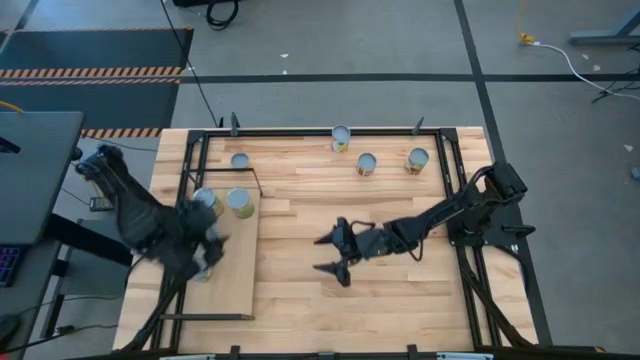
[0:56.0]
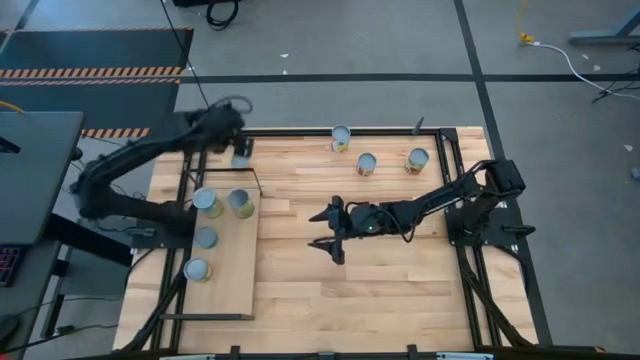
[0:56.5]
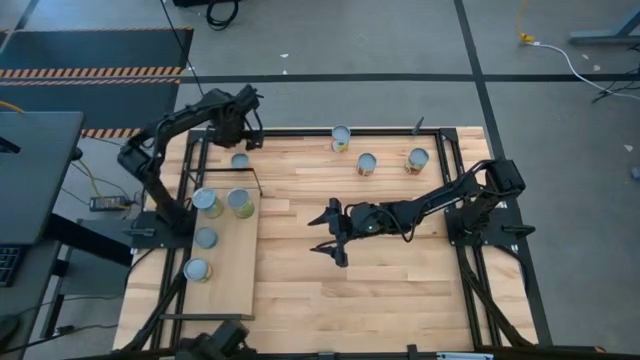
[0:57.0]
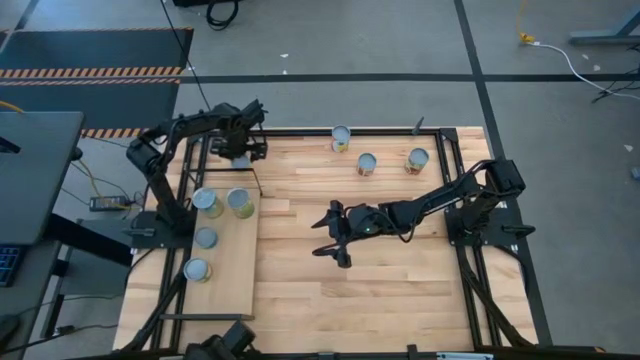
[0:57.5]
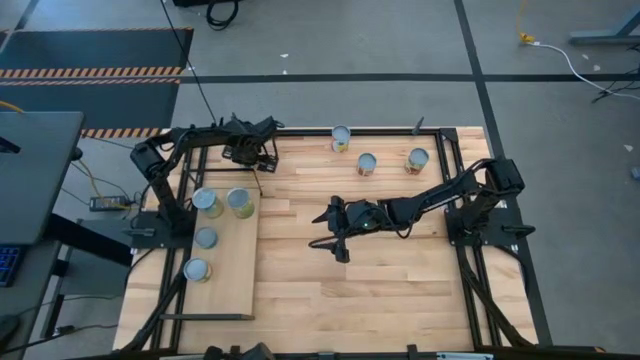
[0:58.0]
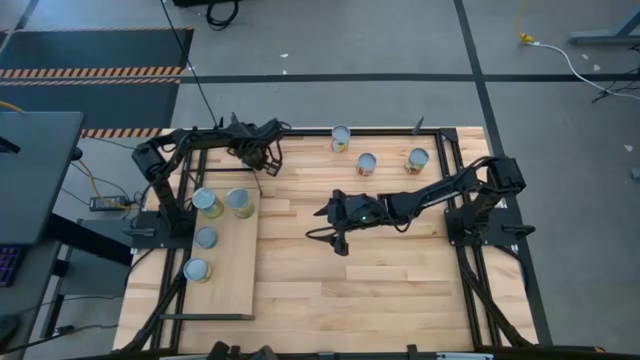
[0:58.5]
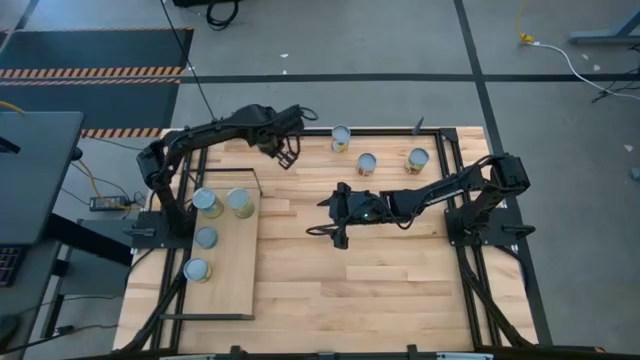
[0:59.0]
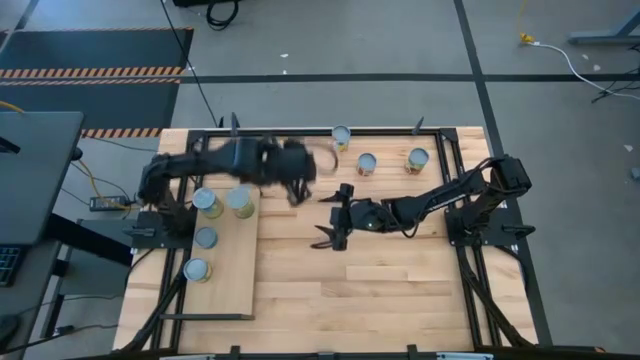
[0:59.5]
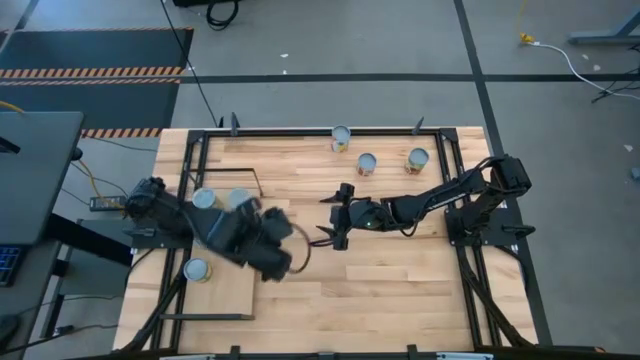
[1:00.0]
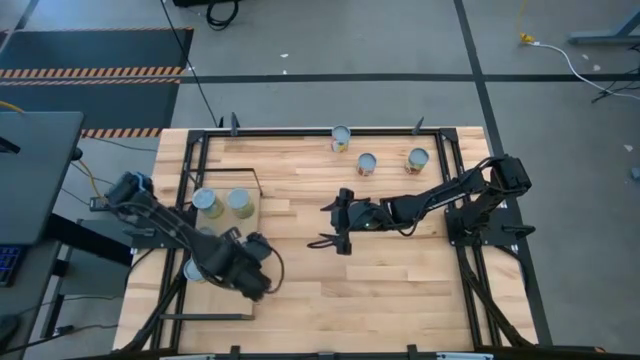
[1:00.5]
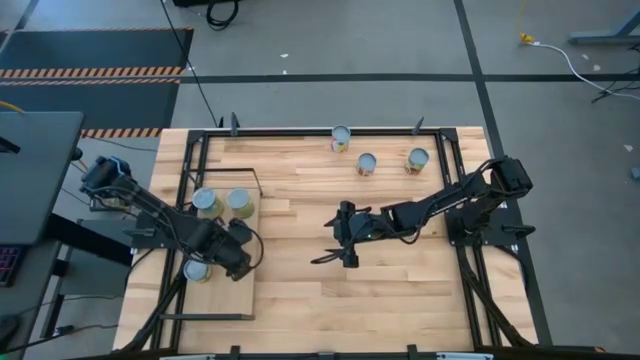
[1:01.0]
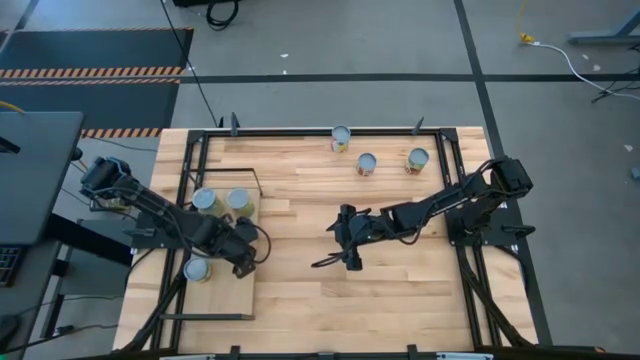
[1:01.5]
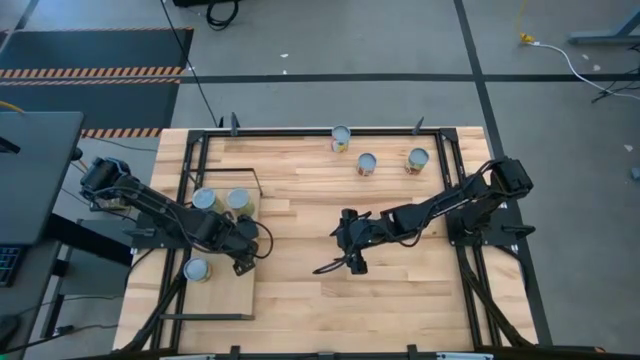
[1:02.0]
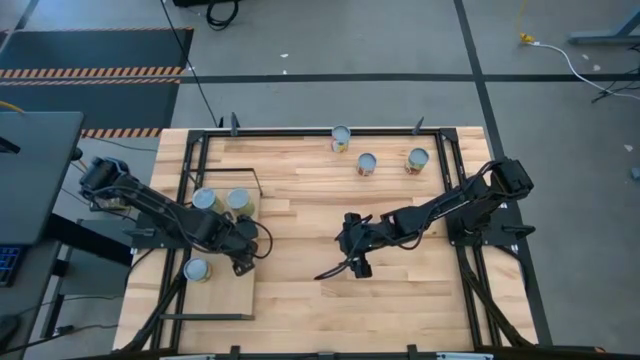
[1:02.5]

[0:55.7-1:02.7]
Task: Pick and place cans onto a shelf
Put the canned mushrooms on the shelf

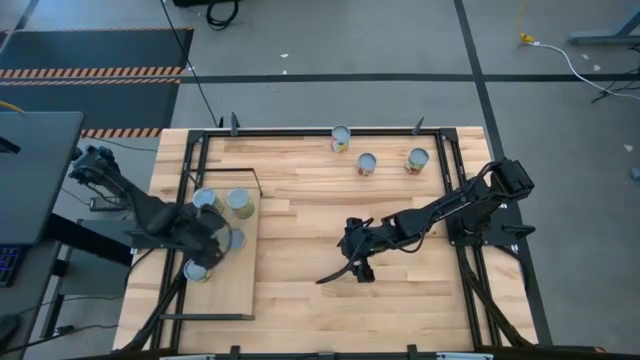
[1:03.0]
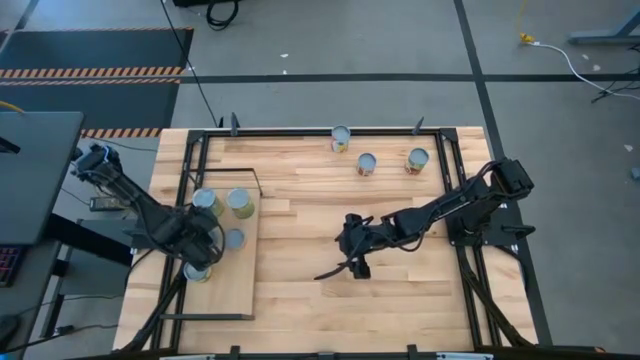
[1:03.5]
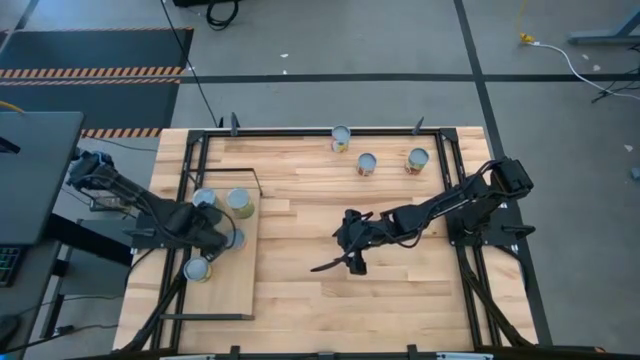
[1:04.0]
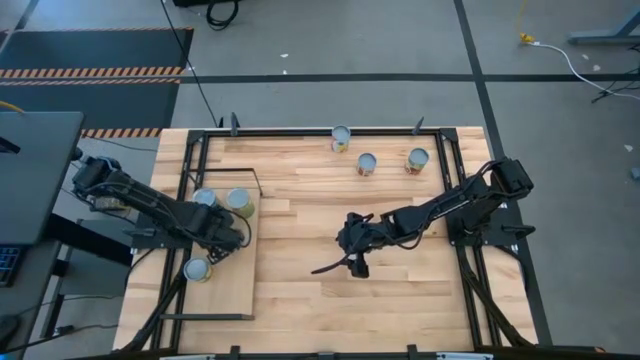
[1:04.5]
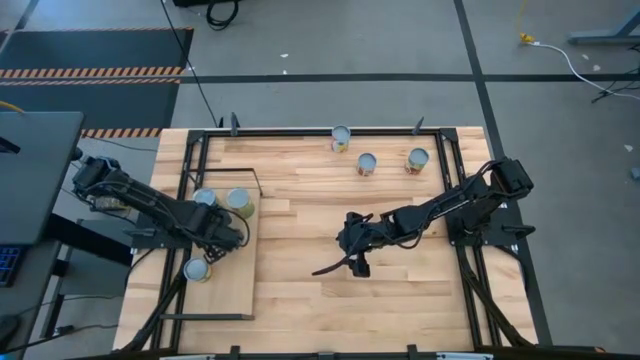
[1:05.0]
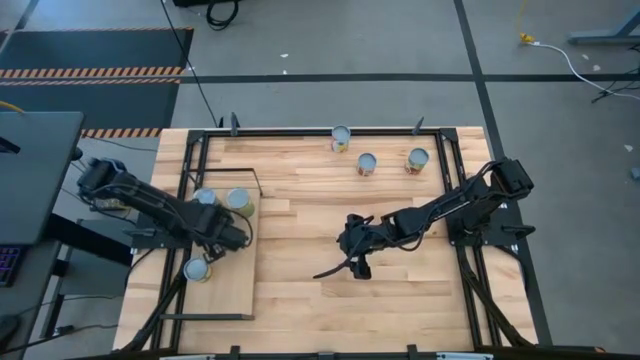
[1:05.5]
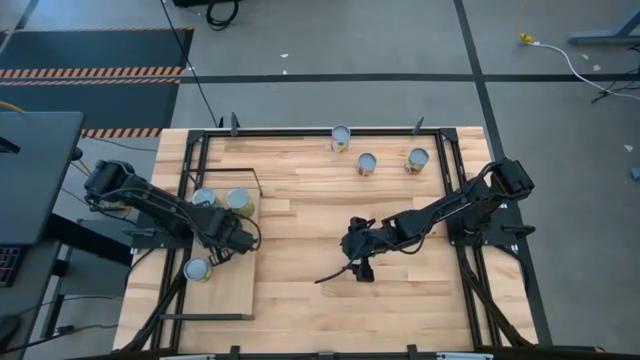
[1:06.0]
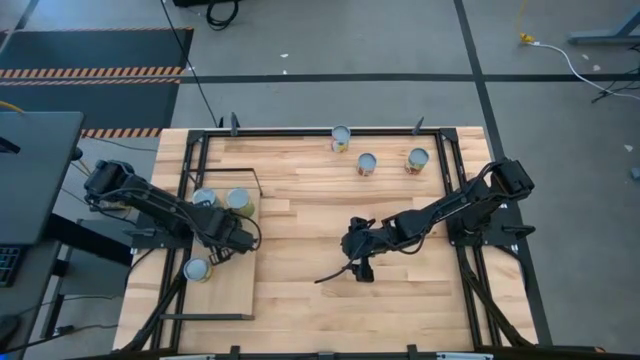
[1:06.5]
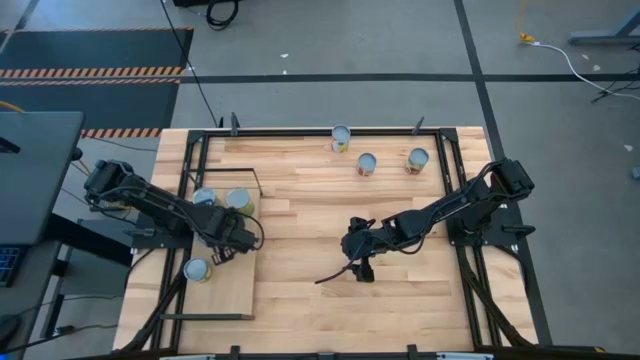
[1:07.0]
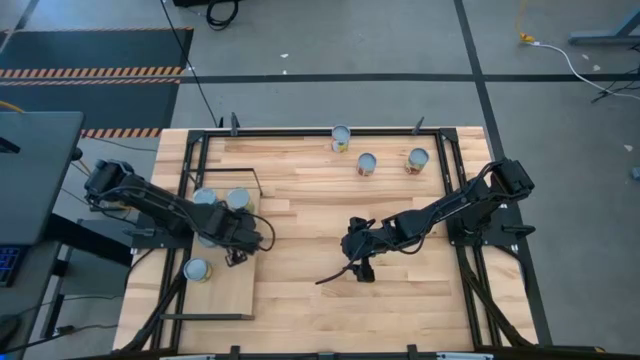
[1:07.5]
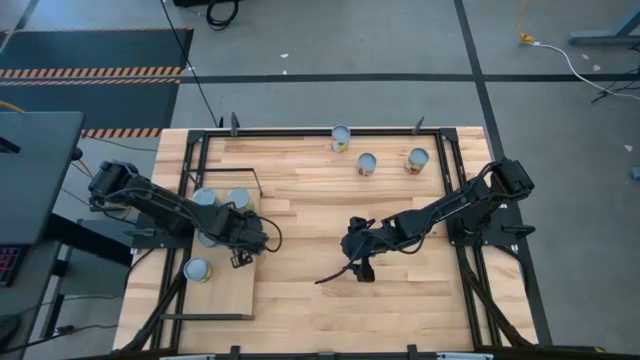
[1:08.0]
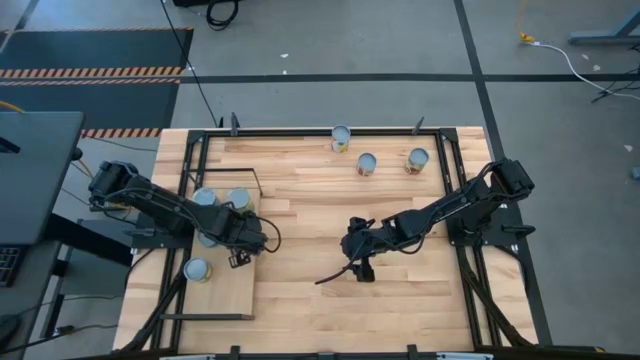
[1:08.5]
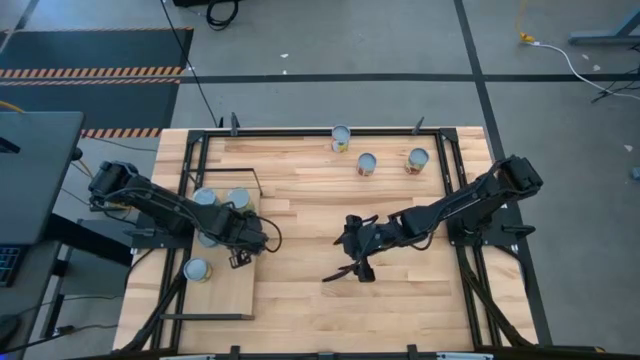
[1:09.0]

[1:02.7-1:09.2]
Adjust the canned tuna and canned mushrooms on the shelf

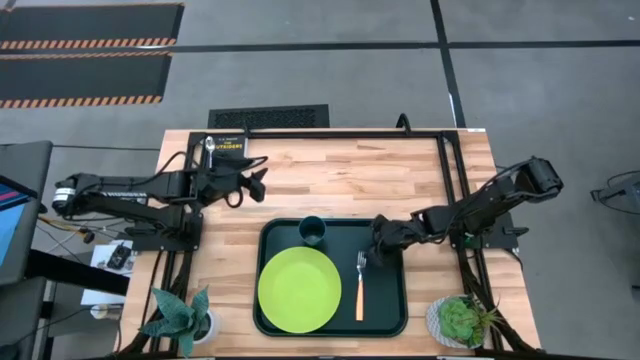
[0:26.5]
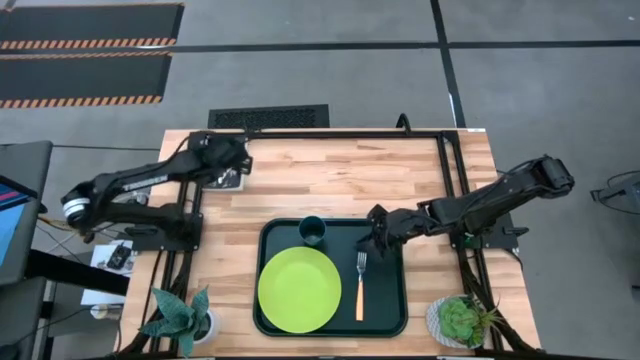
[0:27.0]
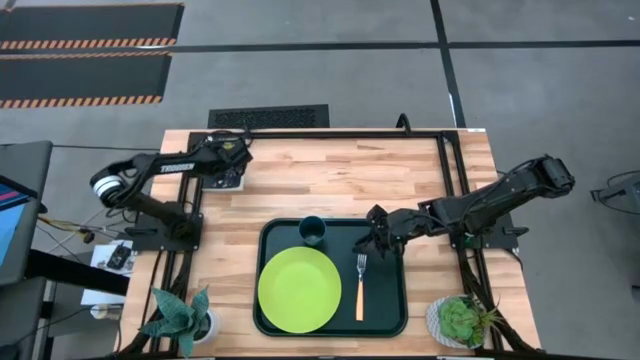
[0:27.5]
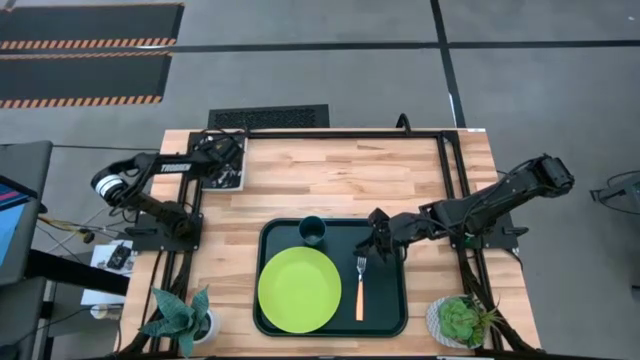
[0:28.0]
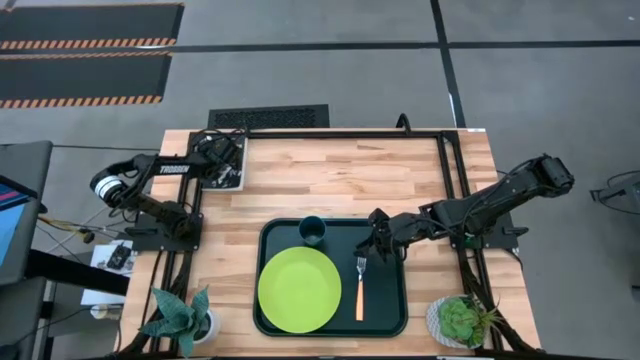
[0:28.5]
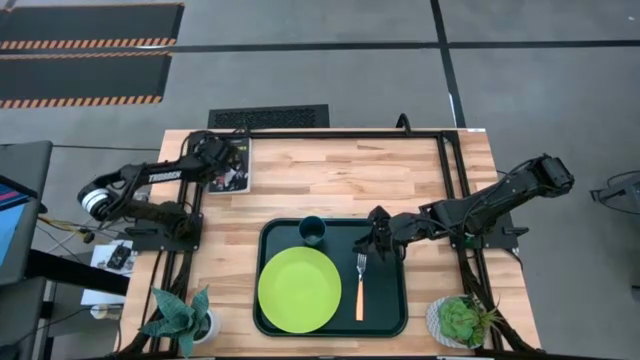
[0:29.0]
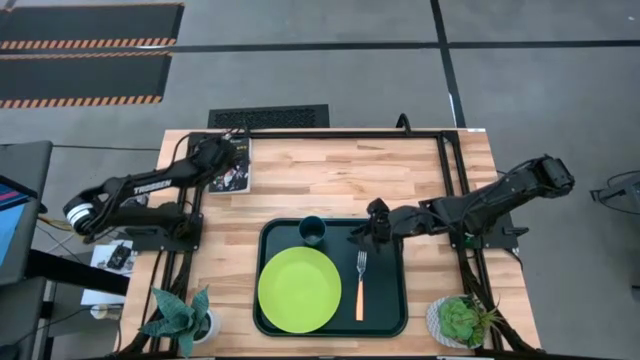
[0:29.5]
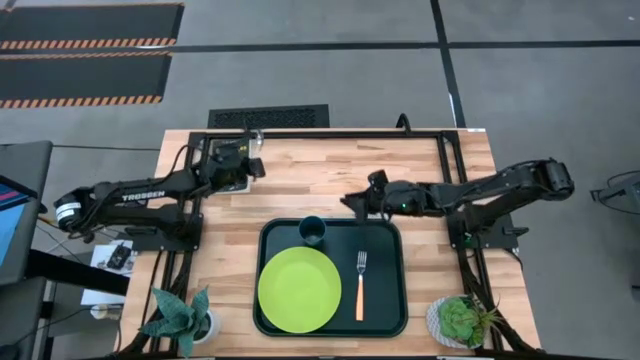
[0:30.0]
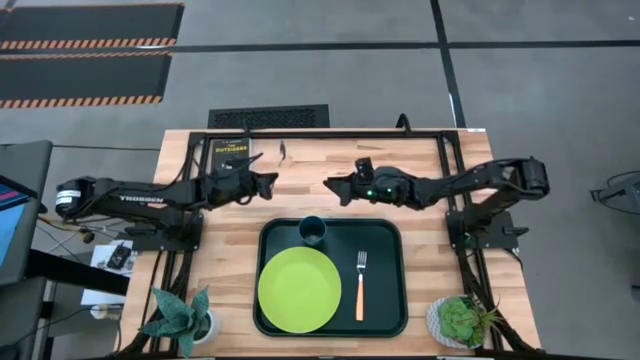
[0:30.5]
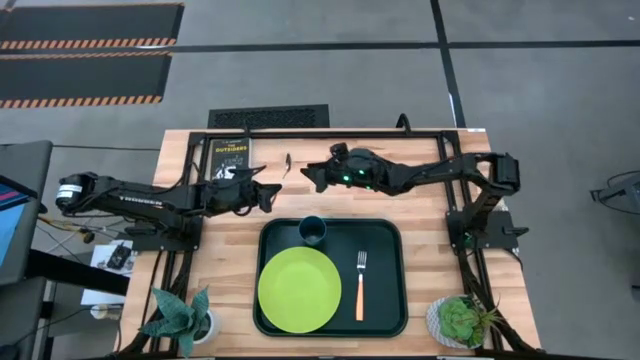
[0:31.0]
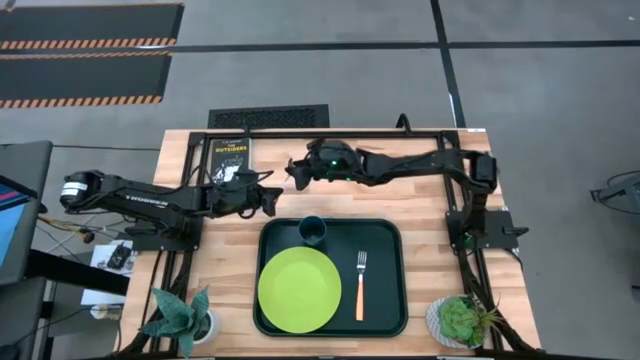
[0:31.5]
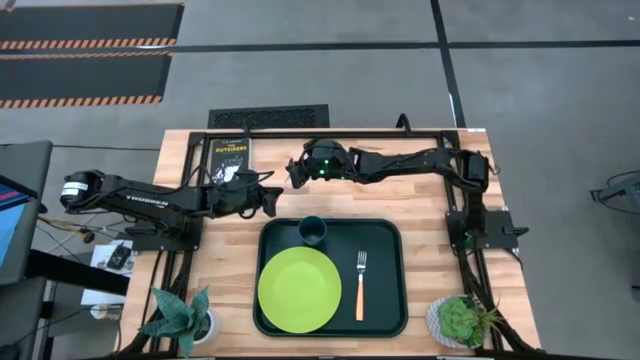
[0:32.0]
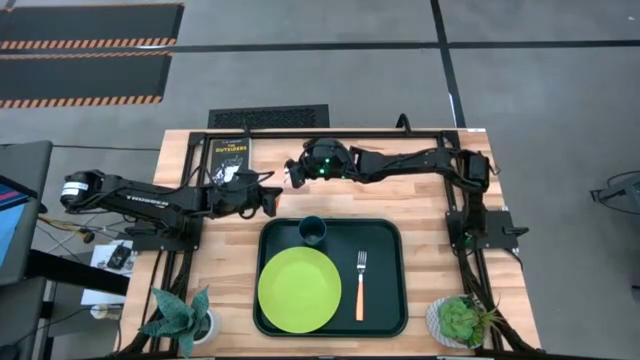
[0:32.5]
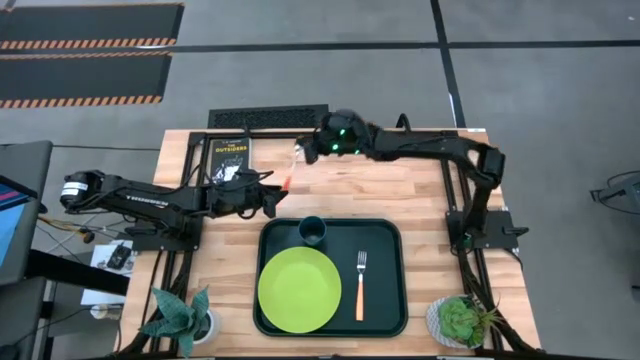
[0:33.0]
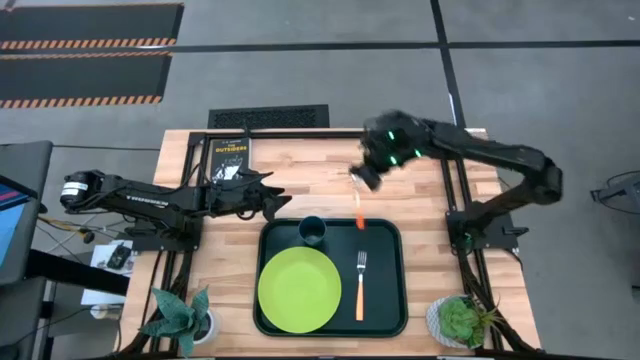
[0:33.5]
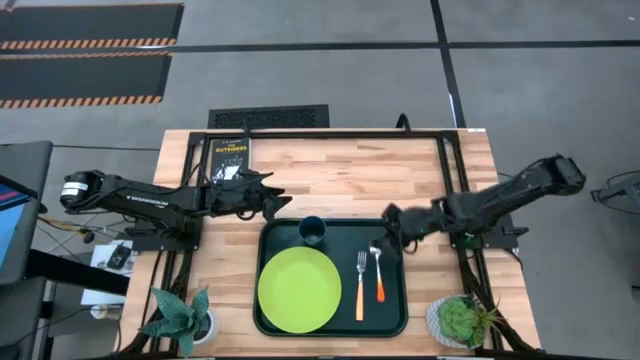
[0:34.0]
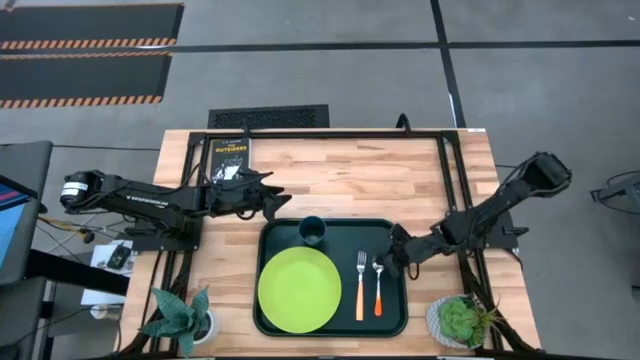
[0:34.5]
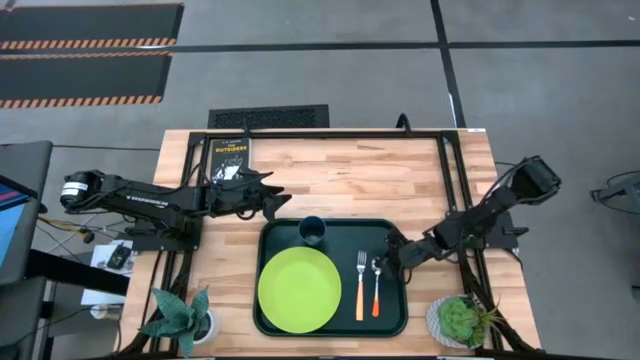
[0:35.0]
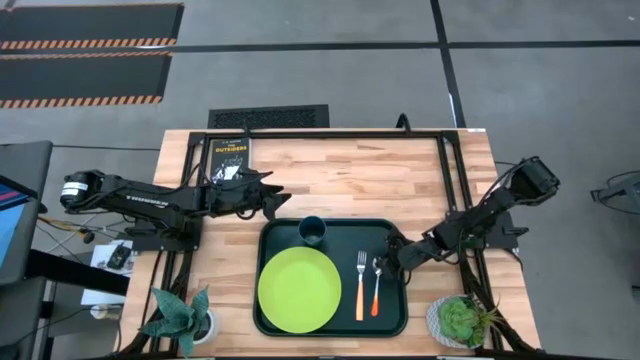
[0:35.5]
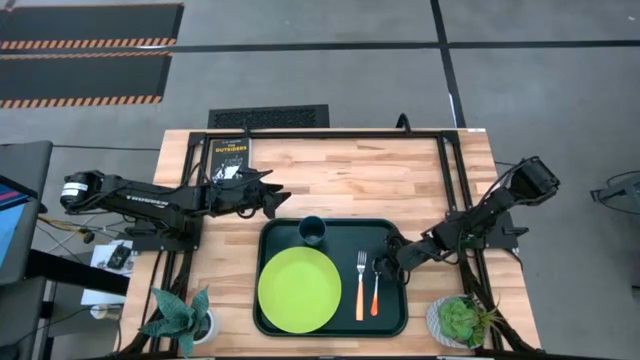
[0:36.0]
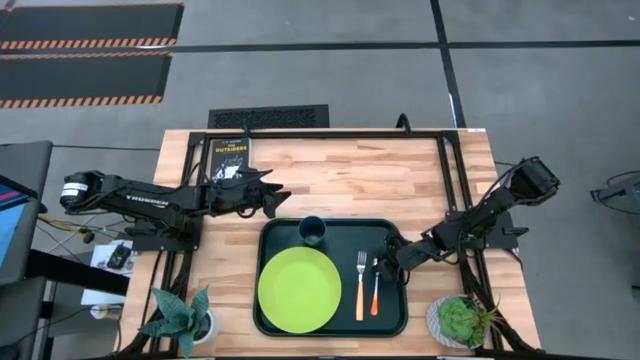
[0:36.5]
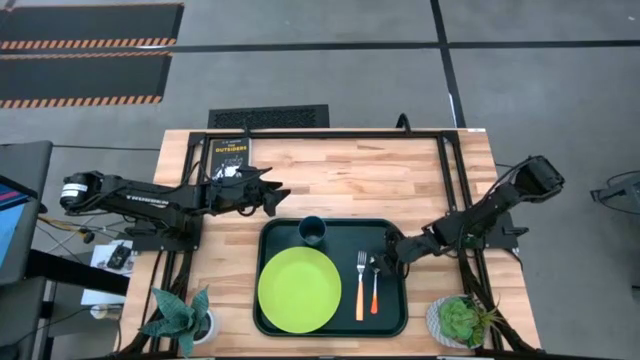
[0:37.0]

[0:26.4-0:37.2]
Task: Pick and place plate/cup/fork/spoon on tray
Put the orange spoon to the right of the light orange fork on the green serving tray
